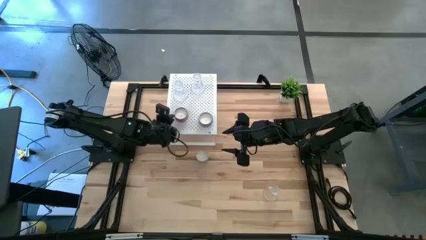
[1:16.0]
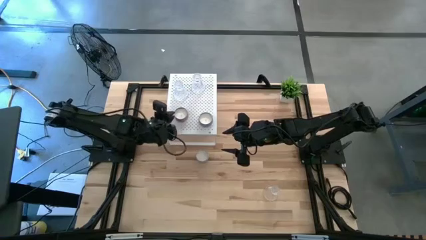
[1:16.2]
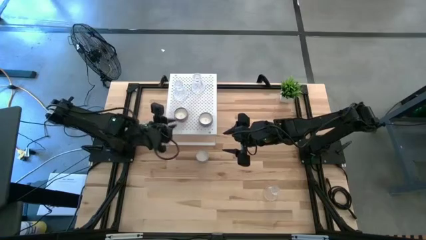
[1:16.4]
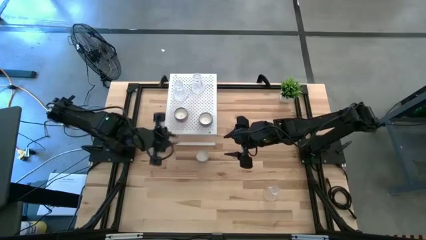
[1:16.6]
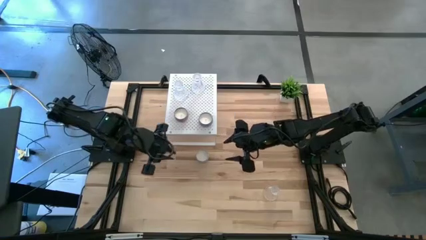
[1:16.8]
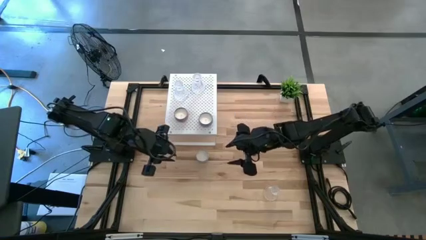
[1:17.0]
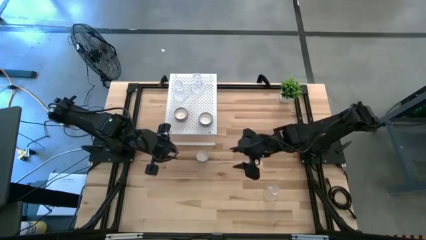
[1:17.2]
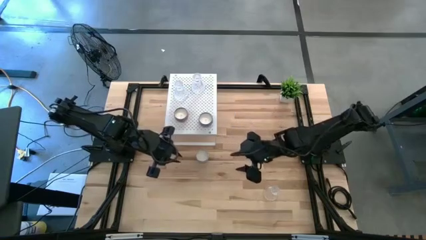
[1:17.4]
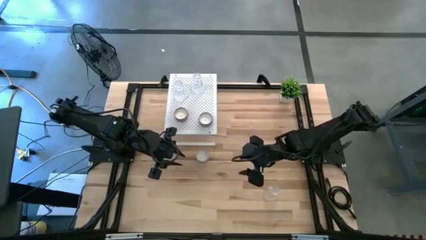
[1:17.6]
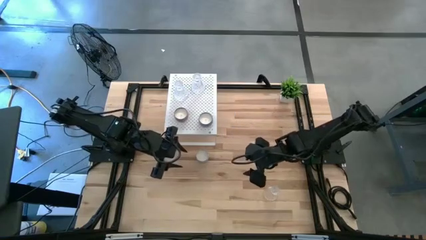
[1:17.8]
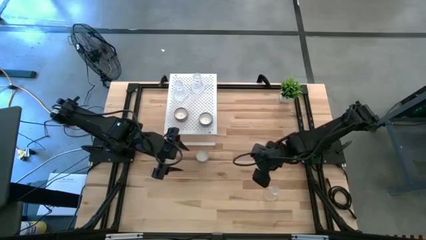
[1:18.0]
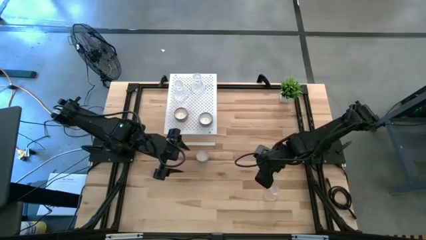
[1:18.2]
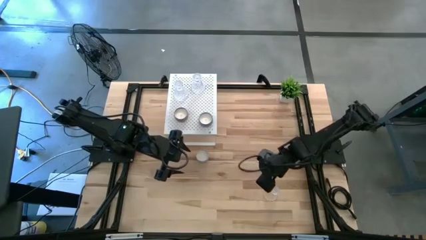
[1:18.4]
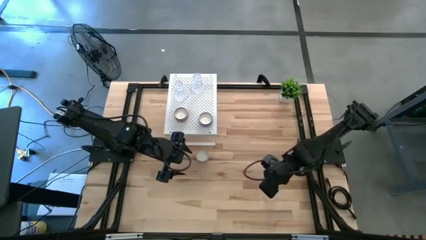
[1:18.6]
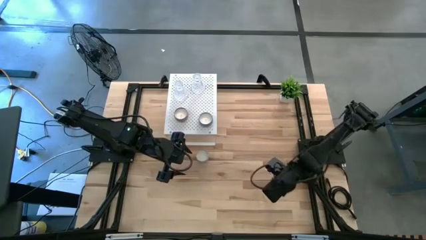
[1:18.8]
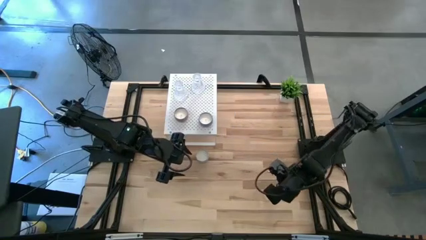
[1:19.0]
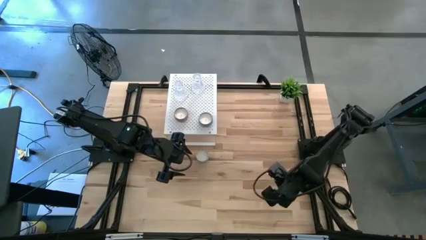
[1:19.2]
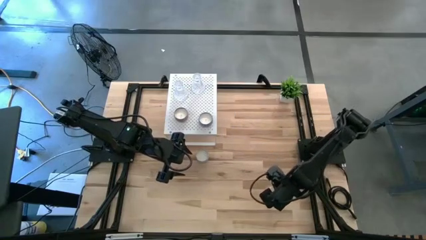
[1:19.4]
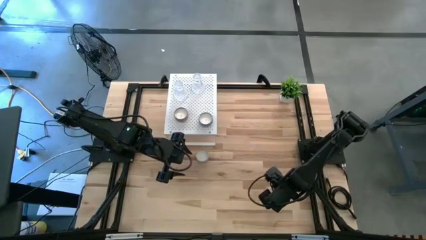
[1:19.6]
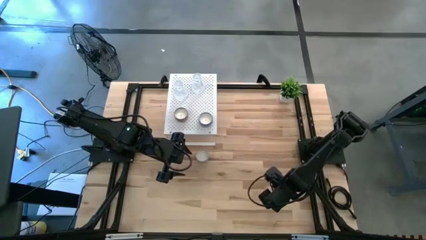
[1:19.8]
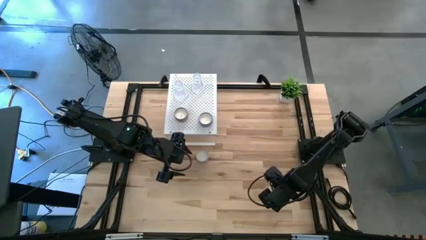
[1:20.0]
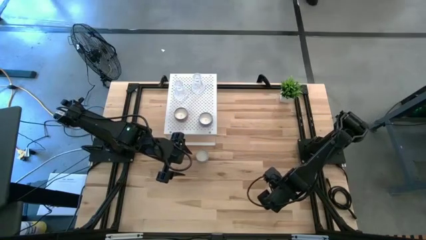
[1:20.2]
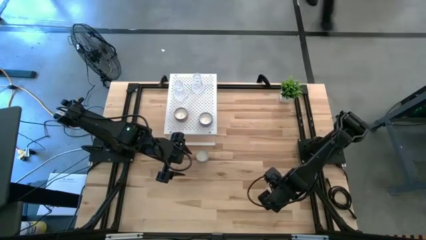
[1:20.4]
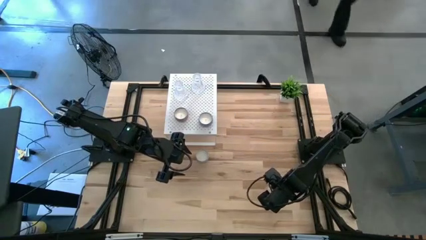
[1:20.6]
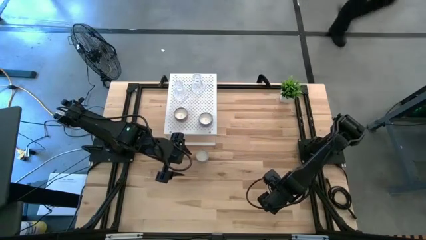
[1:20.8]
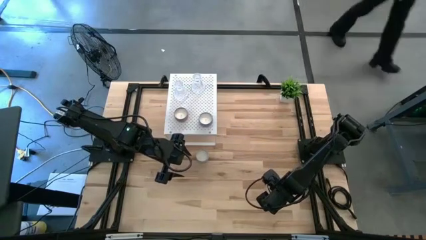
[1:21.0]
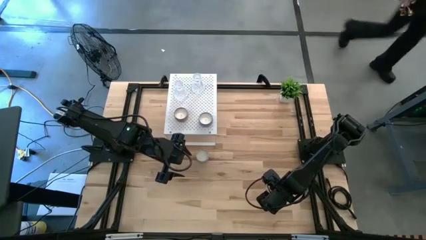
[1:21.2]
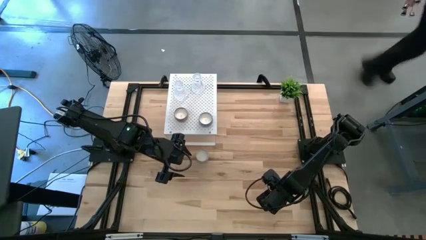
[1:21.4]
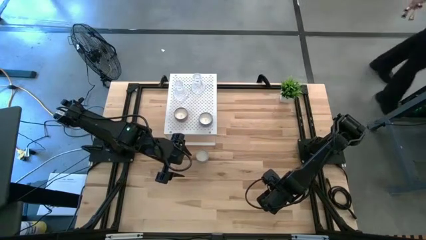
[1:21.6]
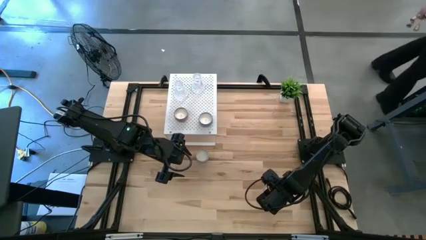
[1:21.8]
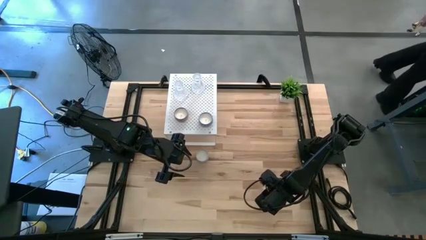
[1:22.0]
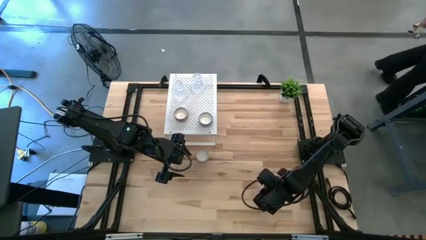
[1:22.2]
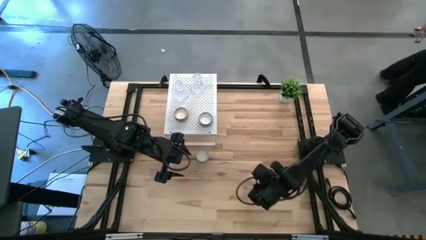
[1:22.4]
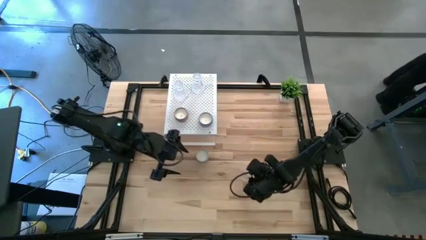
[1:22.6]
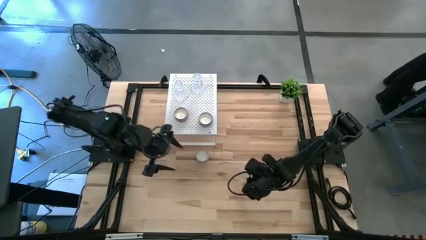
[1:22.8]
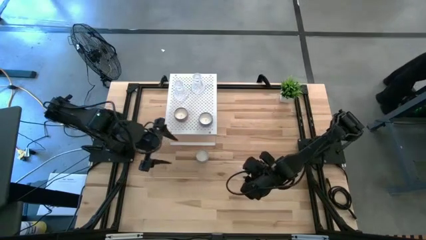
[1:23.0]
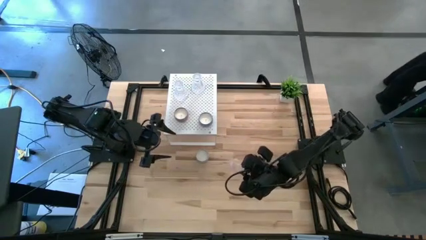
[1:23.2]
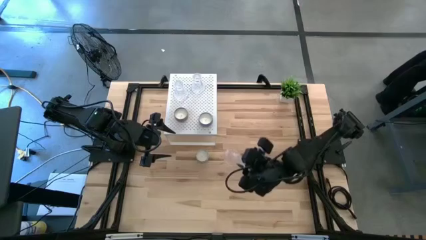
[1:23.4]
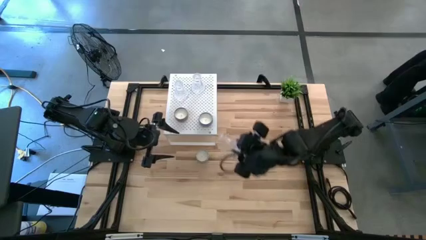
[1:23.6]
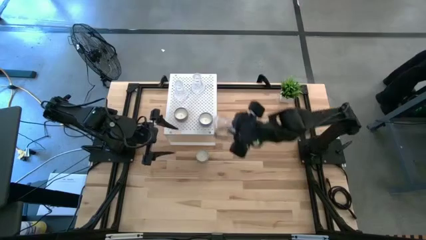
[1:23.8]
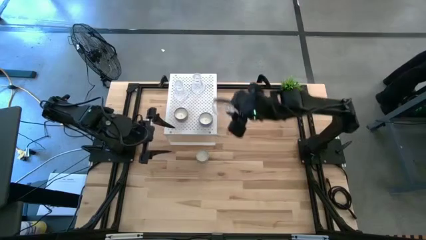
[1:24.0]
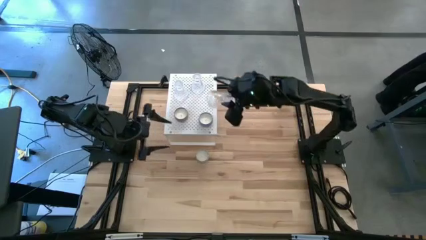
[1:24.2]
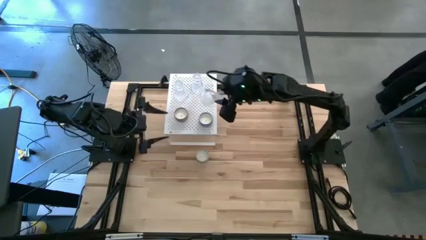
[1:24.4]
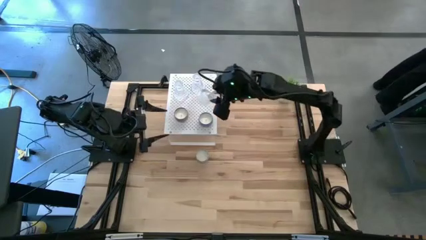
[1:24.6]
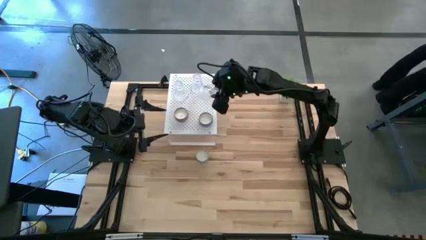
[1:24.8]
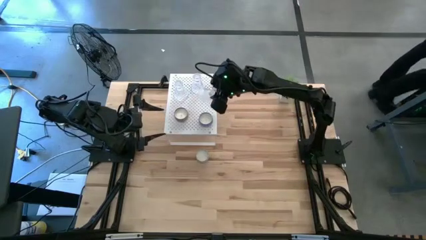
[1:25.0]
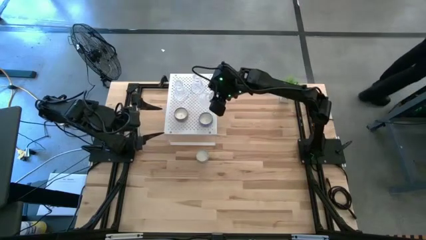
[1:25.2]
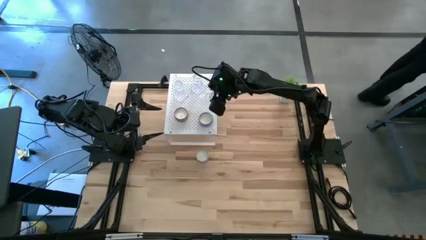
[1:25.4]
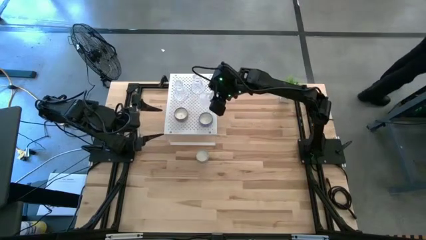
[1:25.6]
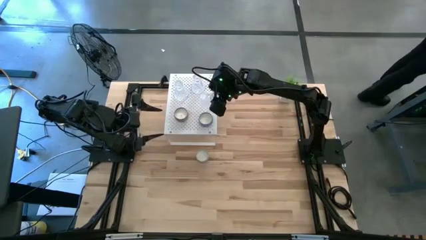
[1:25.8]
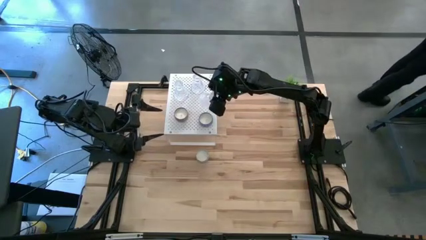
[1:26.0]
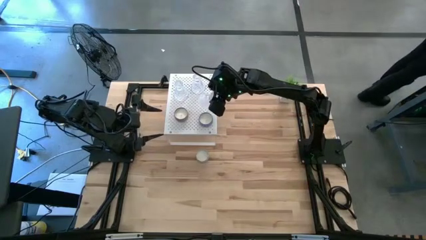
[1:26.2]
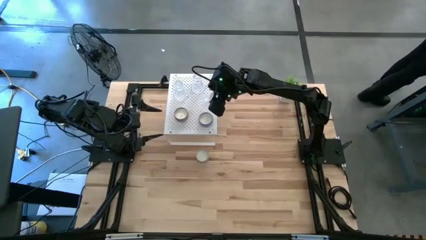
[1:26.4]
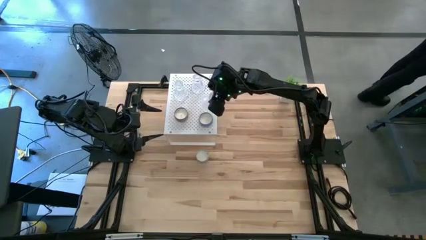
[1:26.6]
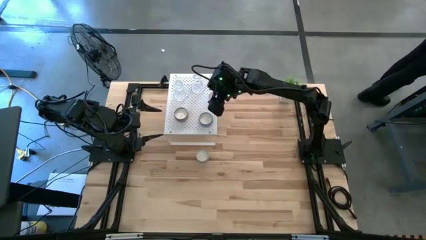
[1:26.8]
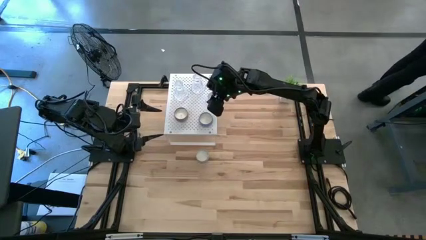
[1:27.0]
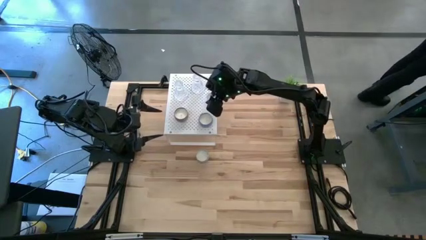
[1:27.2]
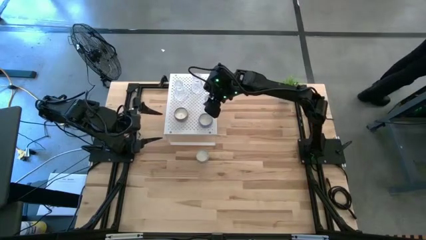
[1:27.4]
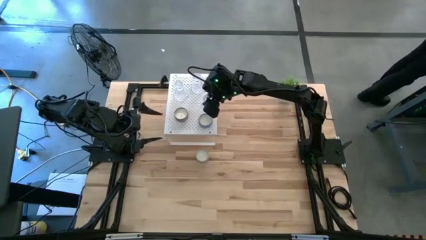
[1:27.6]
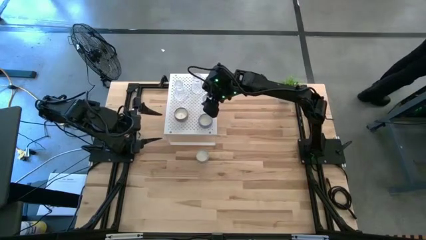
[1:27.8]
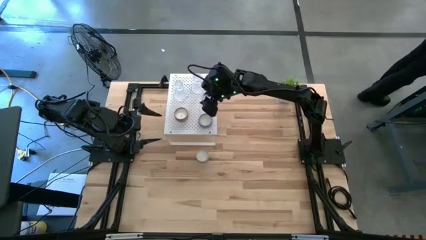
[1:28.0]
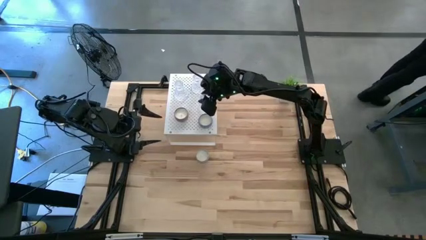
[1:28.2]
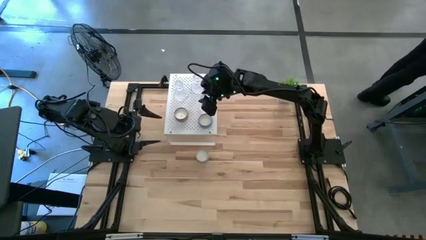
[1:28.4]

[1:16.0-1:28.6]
Task: Pick & Place candle stick holders
Put the transparent candle holder on the shelf

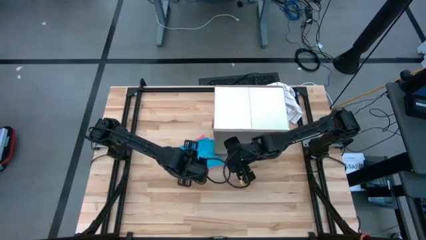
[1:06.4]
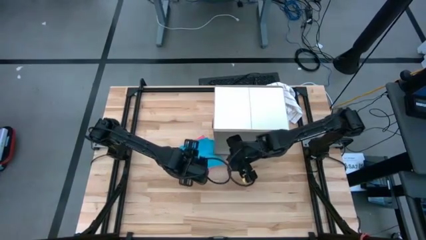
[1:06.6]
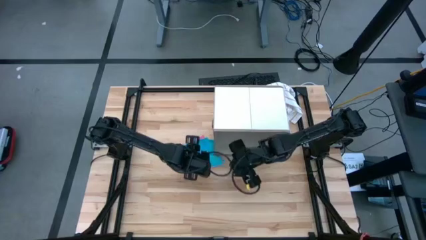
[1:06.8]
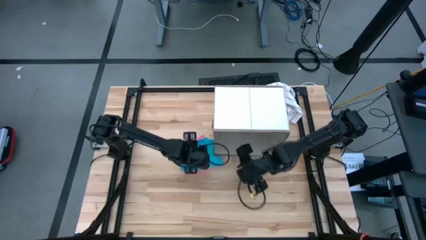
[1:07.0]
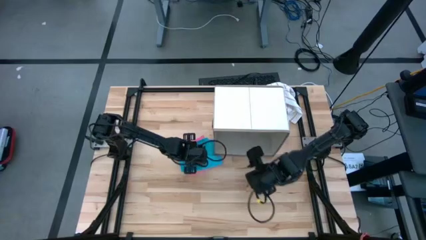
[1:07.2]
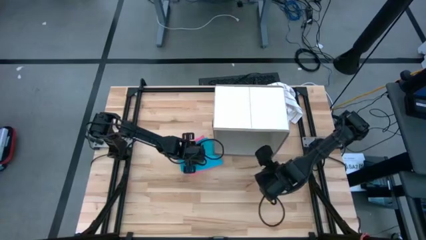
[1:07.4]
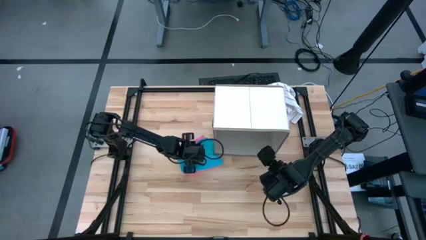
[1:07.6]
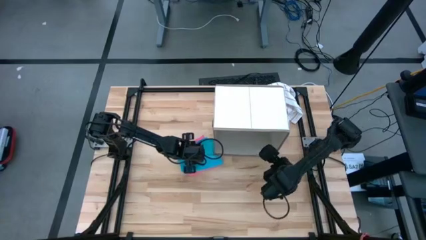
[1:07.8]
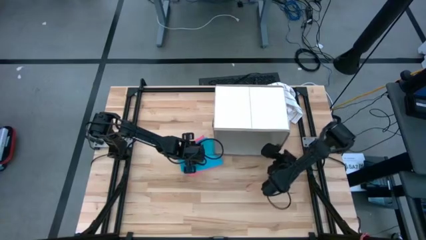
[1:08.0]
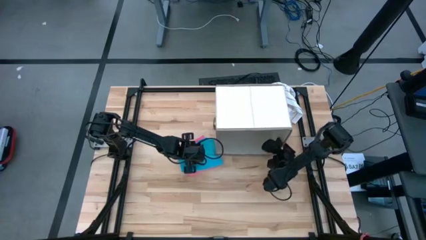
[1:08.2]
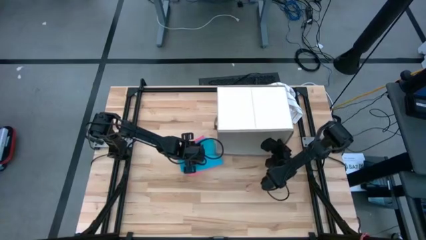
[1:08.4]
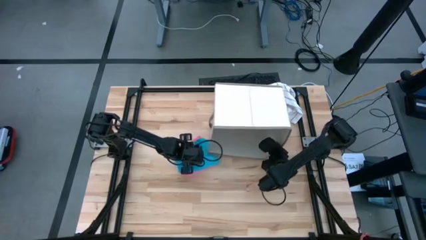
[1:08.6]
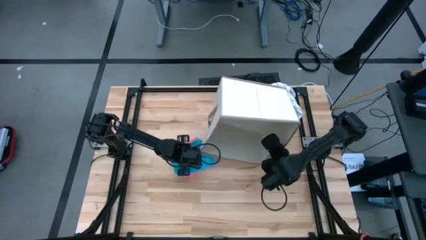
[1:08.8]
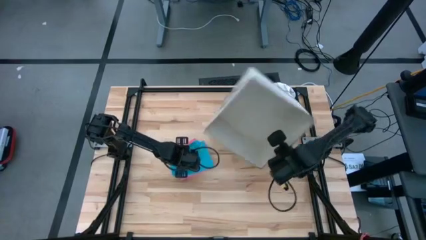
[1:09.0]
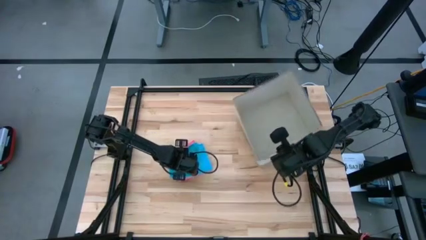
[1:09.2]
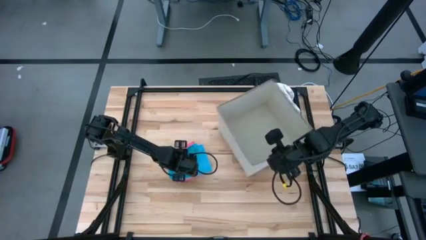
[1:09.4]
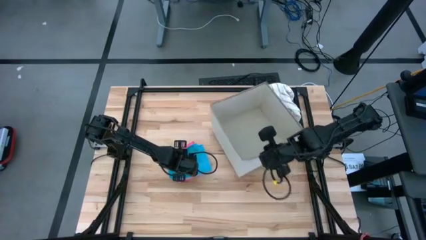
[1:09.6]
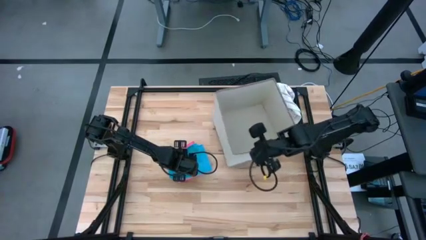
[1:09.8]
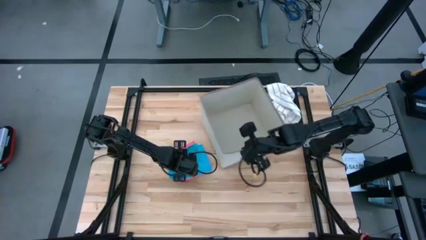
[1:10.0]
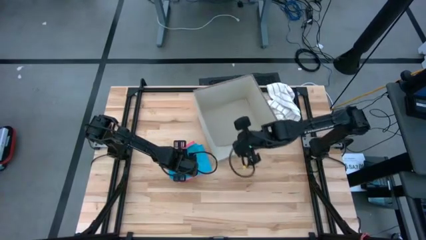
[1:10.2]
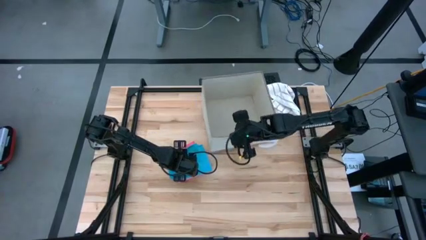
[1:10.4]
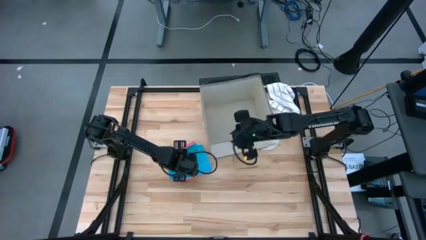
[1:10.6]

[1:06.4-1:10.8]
Task: Fold towel
Adjust the laundry organizer
